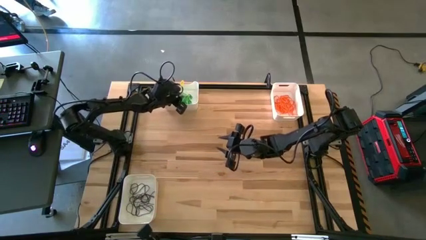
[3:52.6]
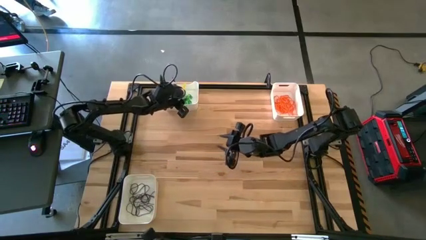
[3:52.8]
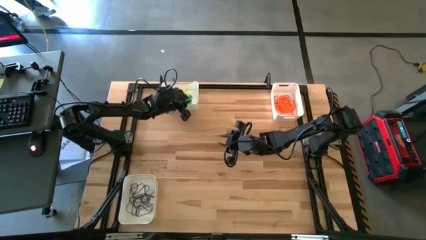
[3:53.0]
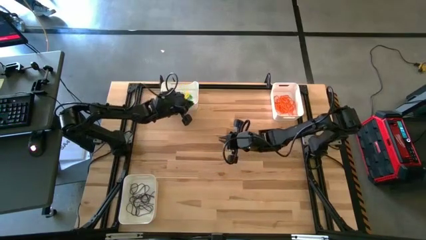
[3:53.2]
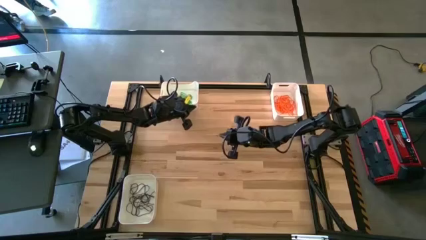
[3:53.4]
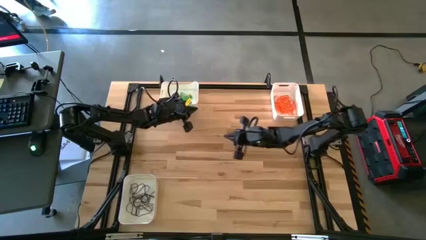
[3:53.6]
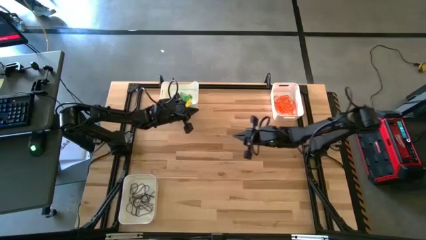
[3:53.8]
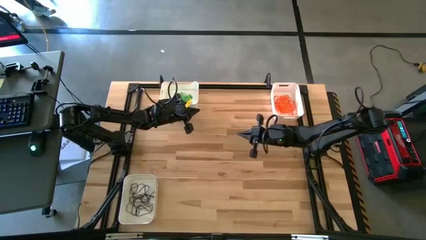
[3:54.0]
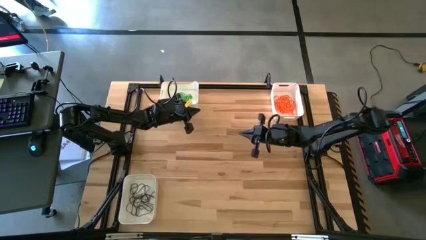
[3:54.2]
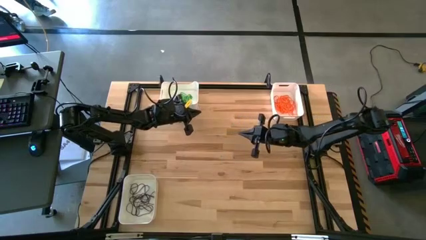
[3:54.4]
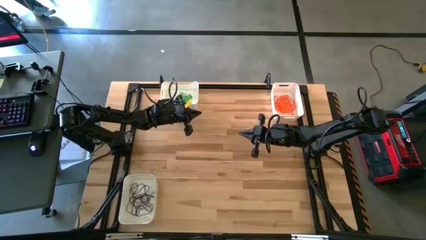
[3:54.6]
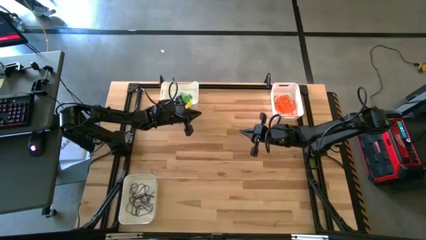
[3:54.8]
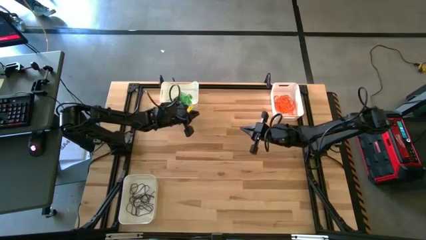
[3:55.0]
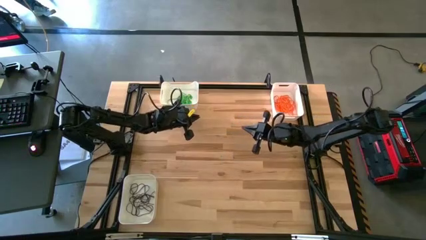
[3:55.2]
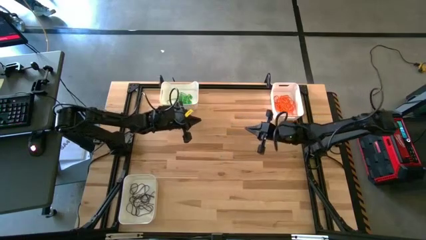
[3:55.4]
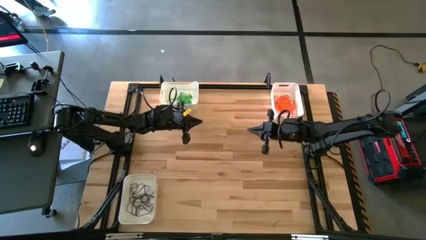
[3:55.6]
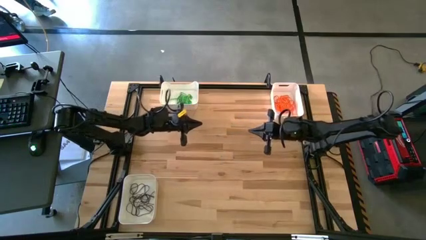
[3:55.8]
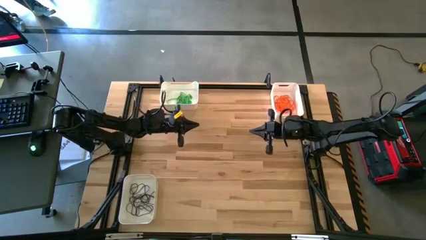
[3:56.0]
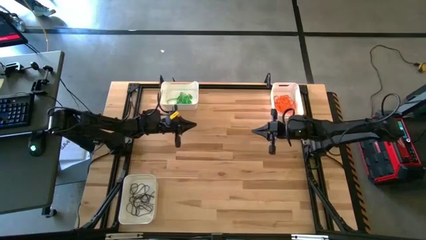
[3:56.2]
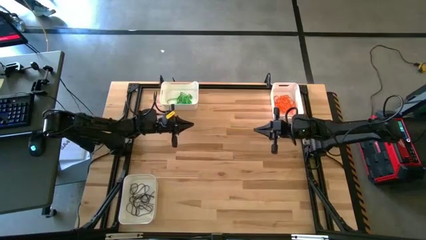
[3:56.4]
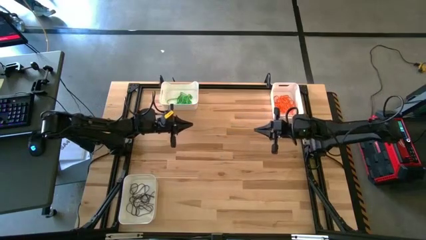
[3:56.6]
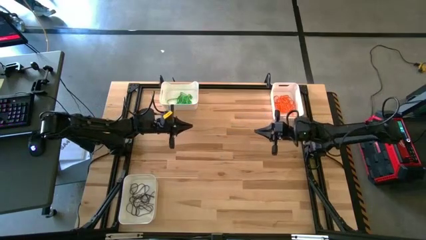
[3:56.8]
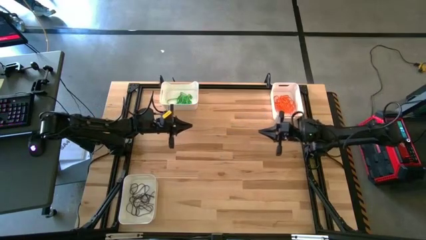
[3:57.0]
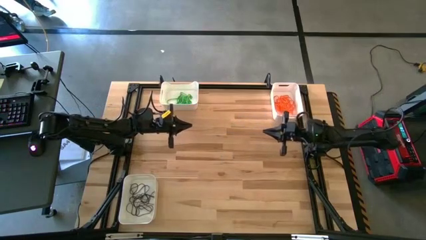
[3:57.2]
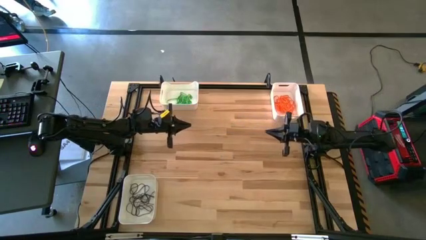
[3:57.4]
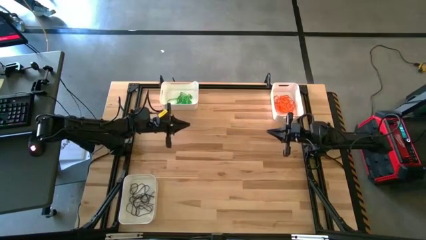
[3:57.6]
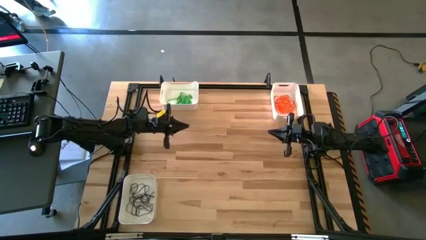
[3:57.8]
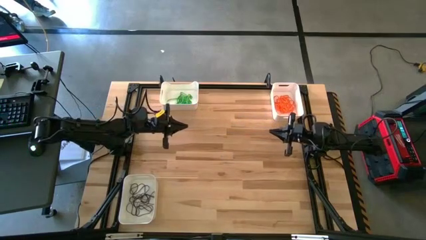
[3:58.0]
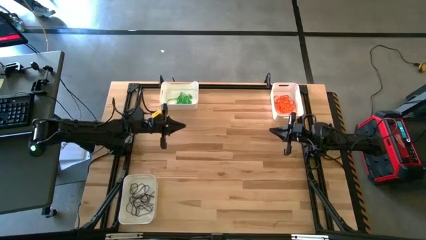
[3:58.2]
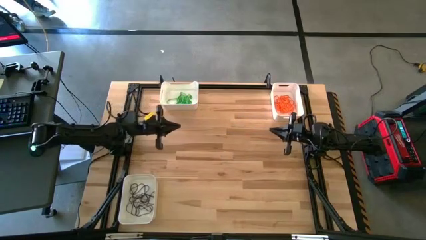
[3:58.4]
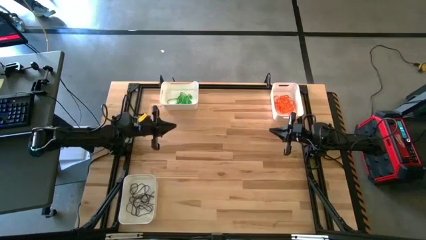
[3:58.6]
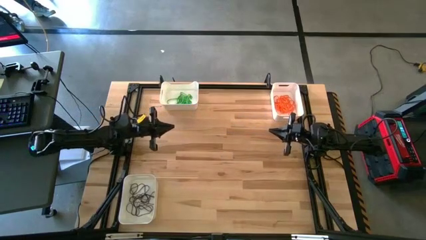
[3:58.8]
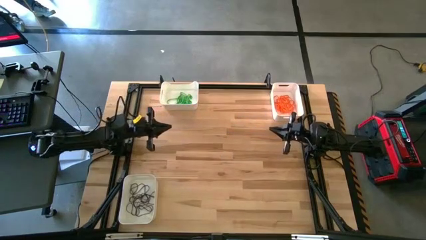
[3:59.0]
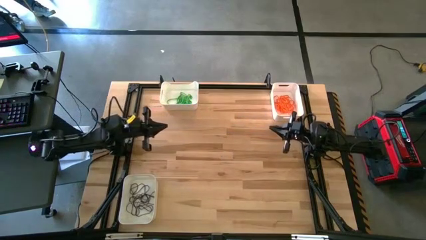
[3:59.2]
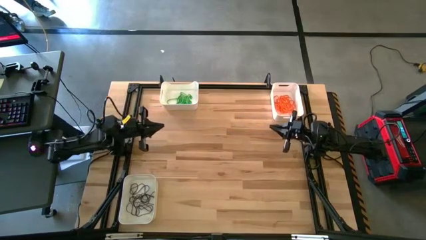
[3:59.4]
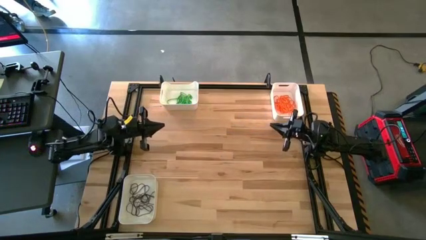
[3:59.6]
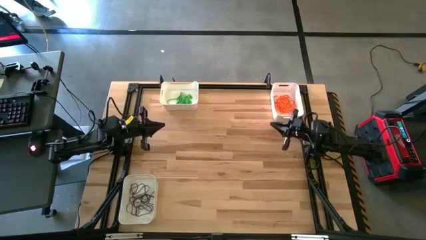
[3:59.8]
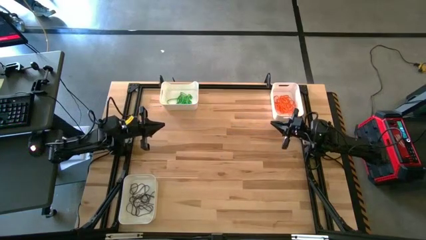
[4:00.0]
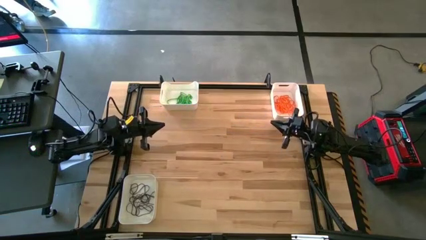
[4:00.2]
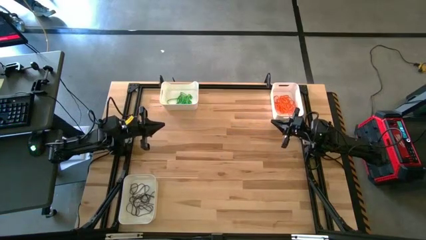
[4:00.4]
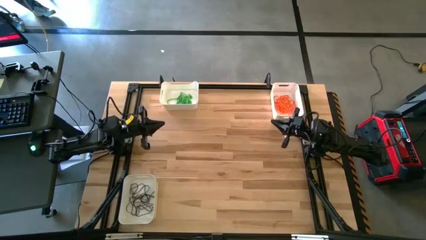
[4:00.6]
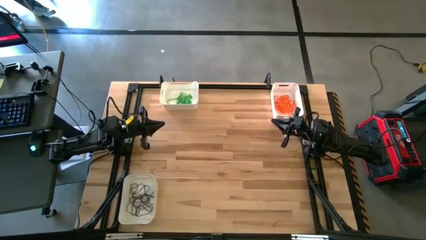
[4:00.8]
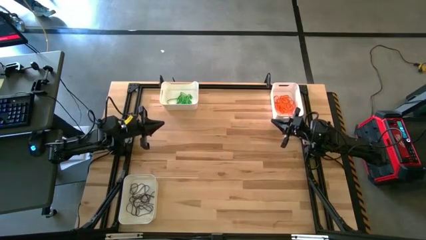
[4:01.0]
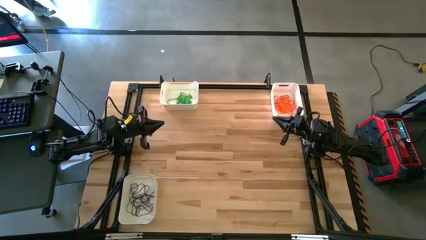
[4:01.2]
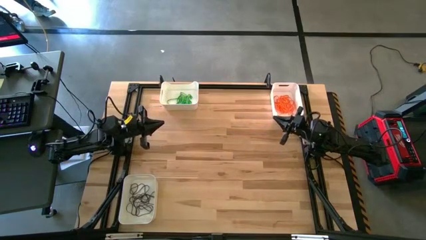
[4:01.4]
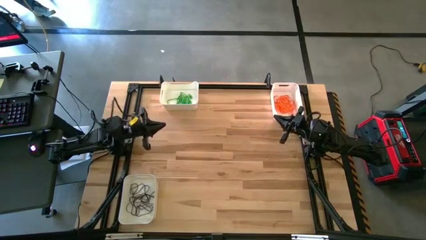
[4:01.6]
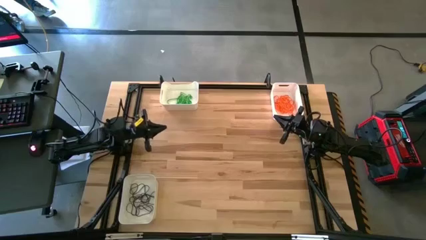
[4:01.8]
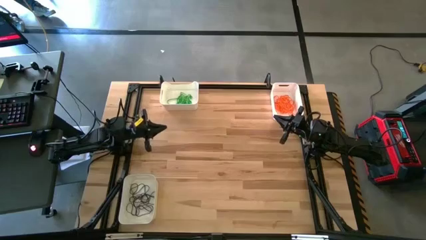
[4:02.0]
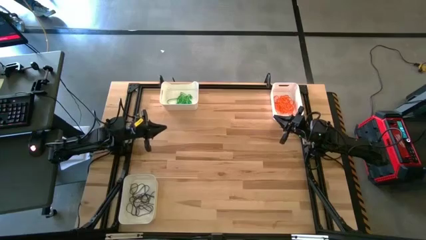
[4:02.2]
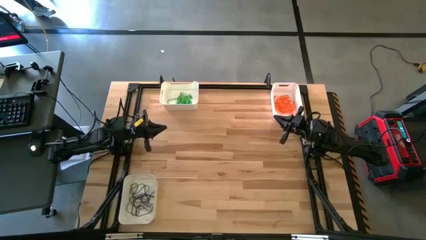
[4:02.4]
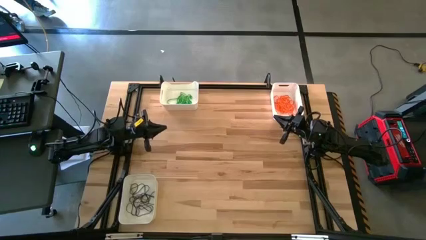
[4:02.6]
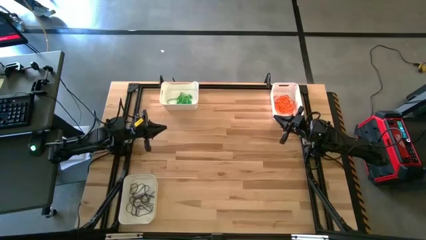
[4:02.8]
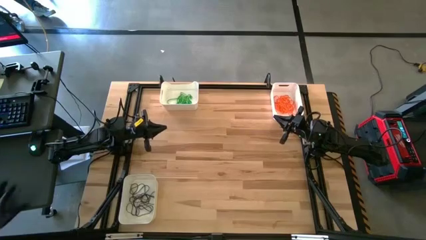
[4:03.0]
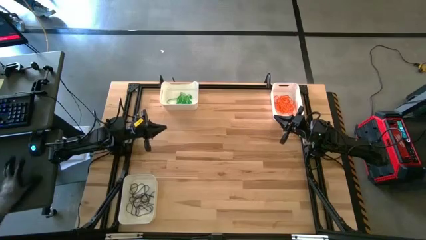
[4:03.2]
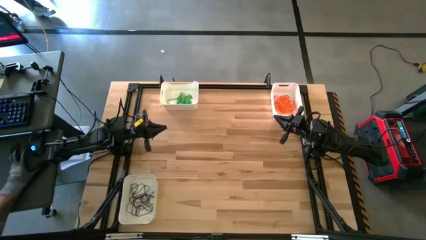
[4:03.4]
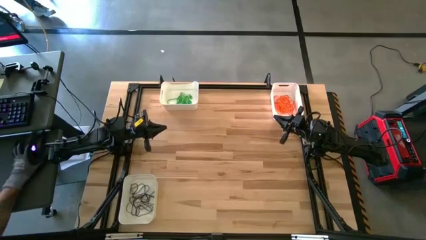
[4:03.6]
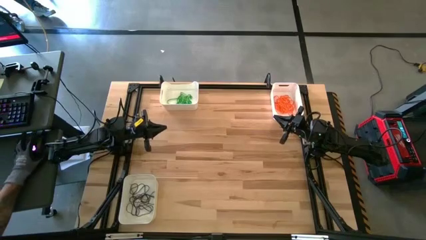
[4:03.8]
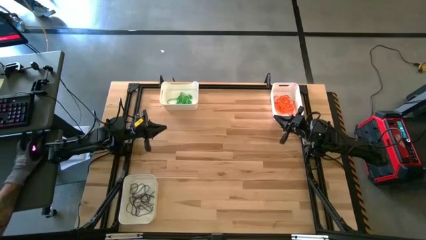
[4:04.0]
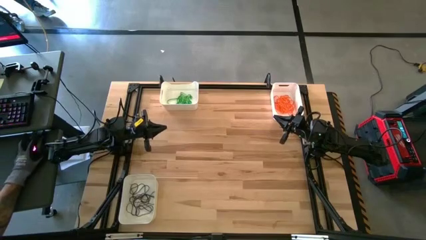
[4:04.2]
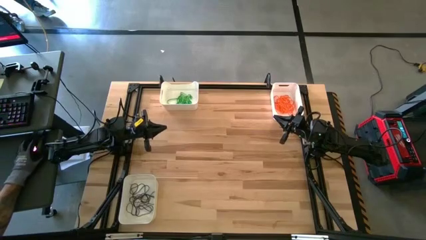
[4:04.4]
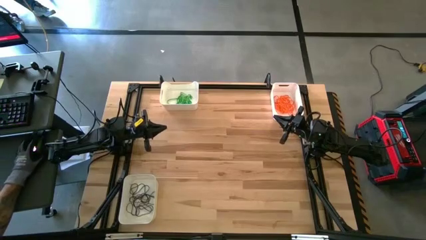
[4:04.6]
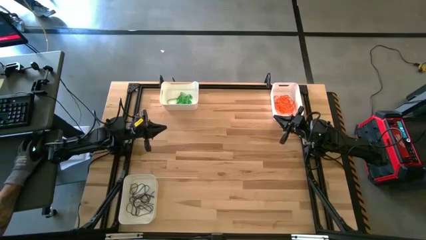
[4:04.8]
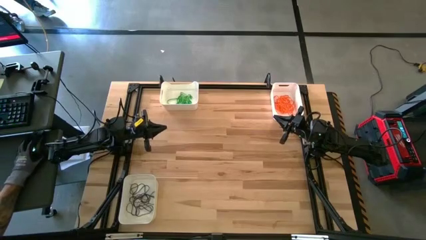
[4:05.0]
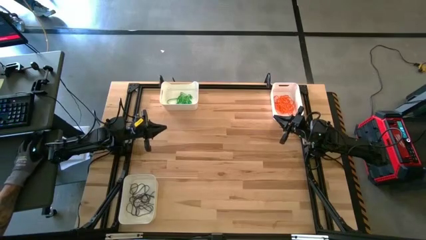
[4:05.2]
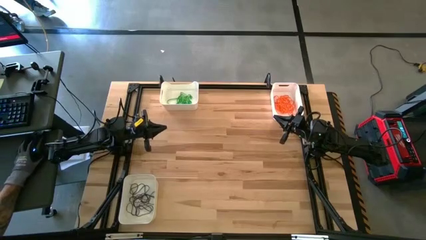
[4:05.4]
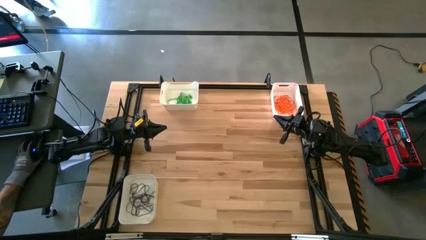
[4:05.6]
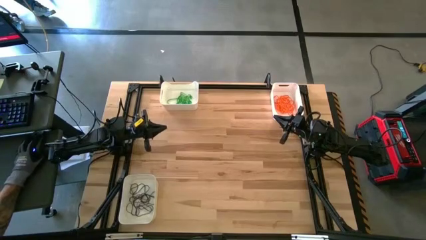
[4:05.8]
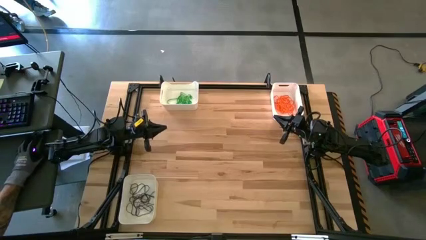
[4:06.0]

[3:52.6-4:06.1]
Task: Sort rubber bands into baskets
Return to Home Position
